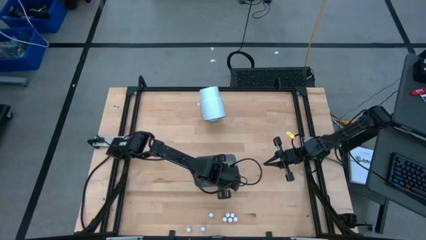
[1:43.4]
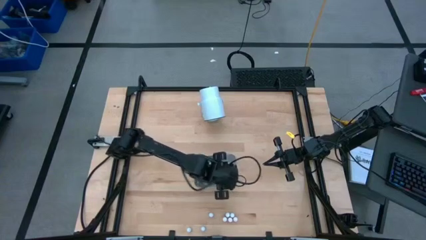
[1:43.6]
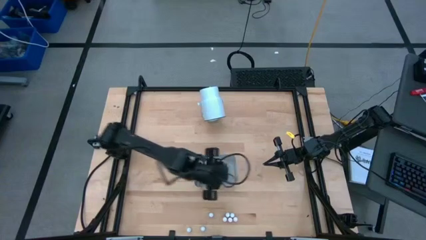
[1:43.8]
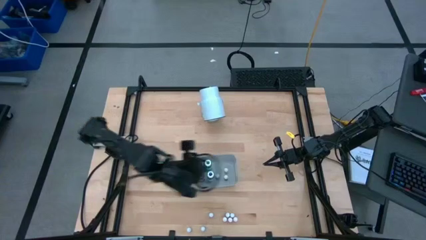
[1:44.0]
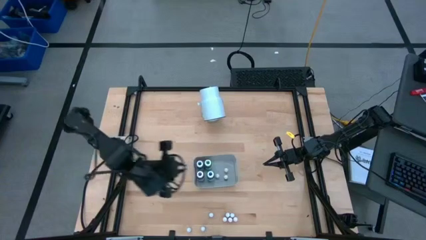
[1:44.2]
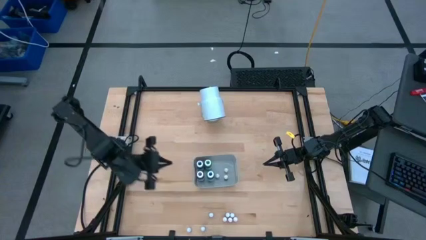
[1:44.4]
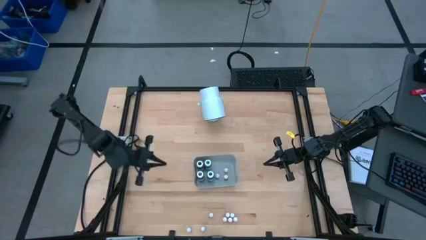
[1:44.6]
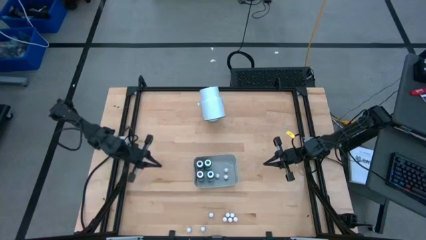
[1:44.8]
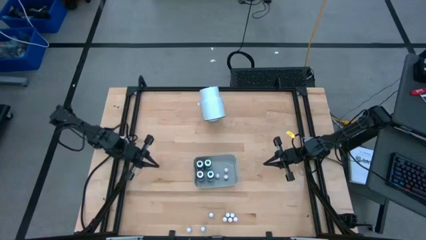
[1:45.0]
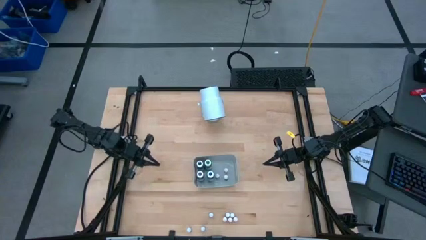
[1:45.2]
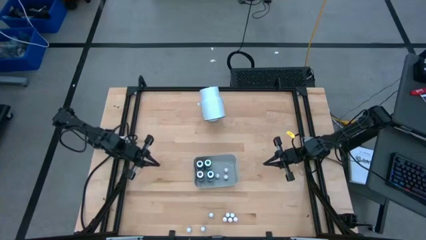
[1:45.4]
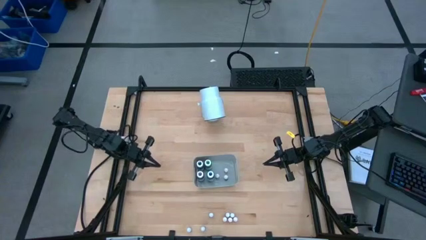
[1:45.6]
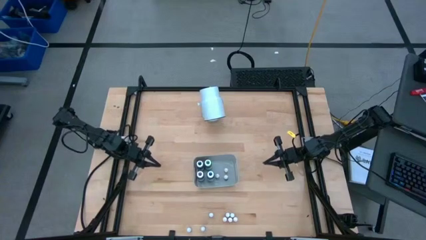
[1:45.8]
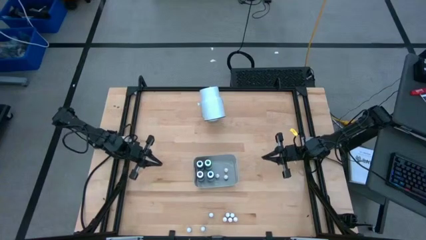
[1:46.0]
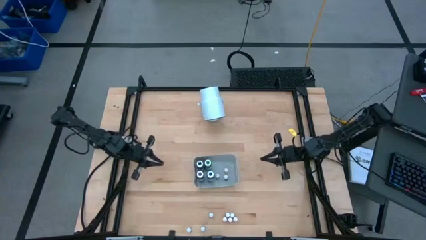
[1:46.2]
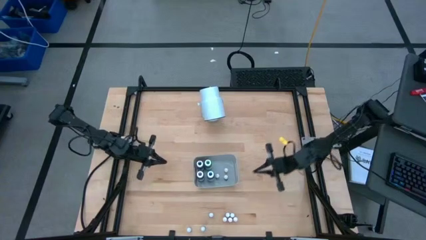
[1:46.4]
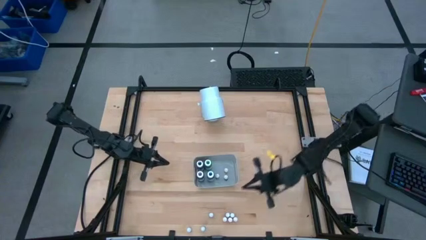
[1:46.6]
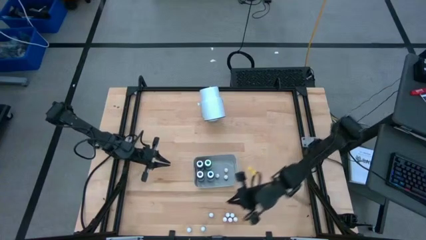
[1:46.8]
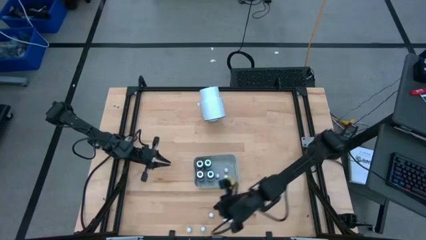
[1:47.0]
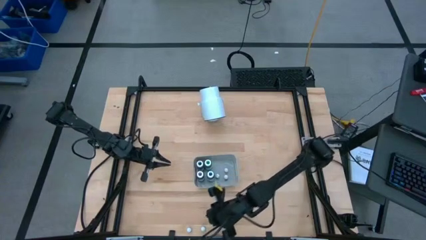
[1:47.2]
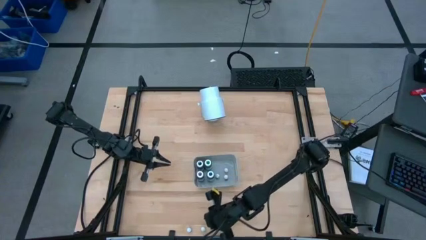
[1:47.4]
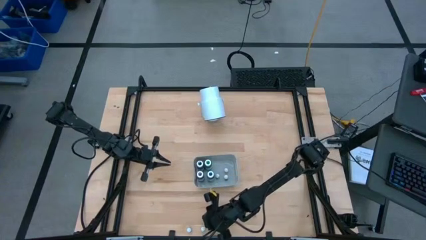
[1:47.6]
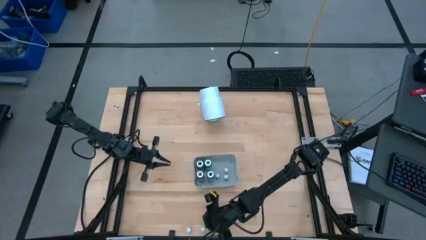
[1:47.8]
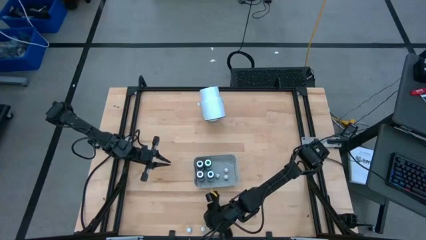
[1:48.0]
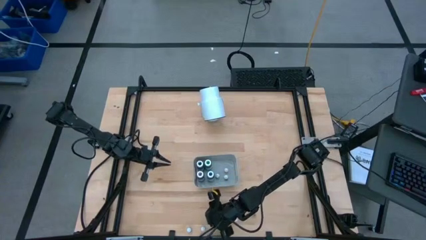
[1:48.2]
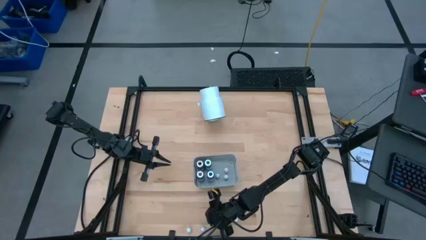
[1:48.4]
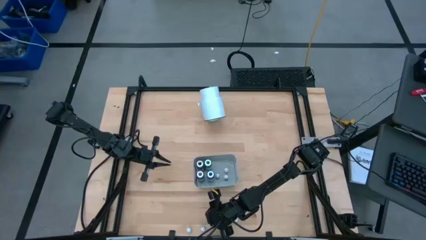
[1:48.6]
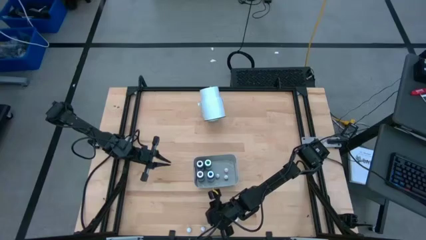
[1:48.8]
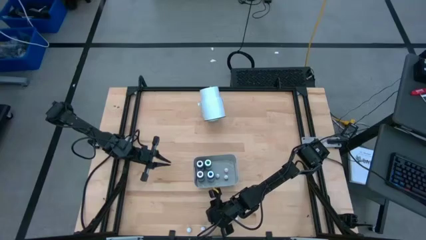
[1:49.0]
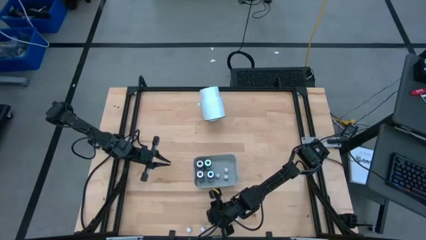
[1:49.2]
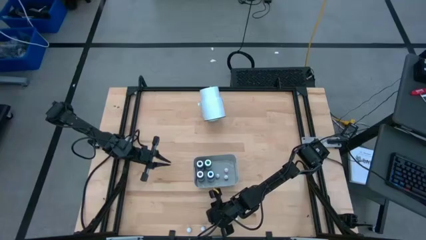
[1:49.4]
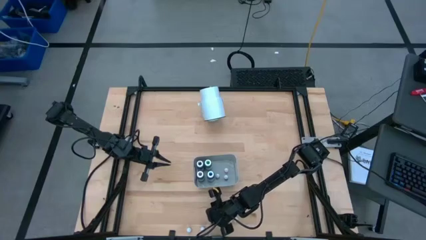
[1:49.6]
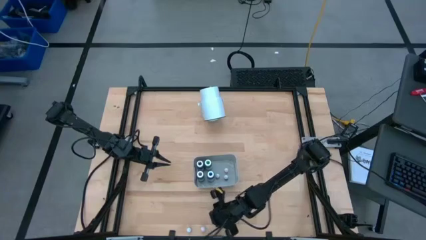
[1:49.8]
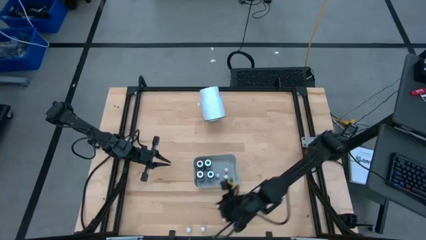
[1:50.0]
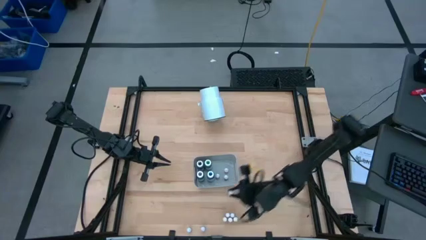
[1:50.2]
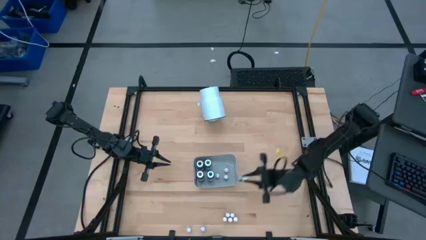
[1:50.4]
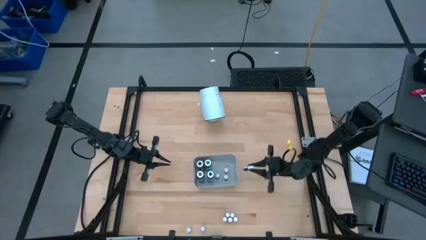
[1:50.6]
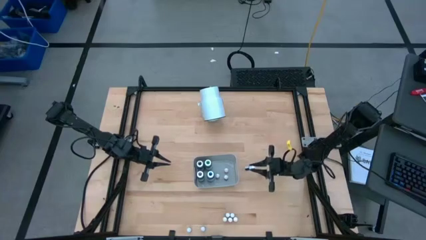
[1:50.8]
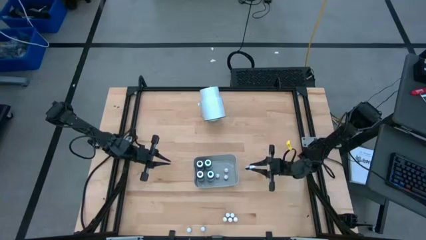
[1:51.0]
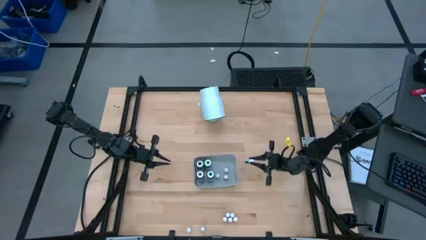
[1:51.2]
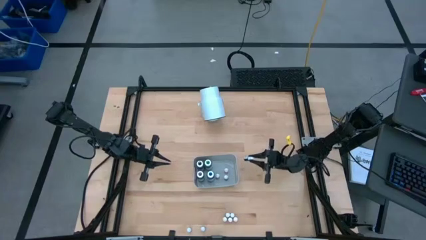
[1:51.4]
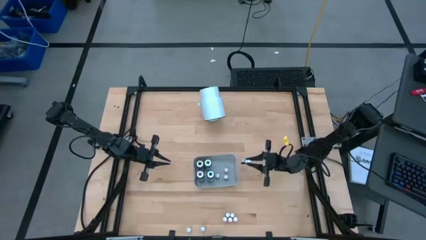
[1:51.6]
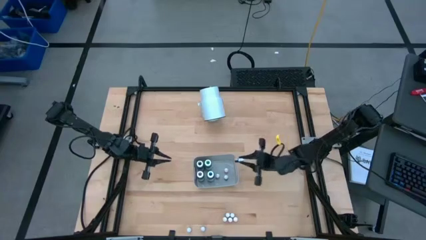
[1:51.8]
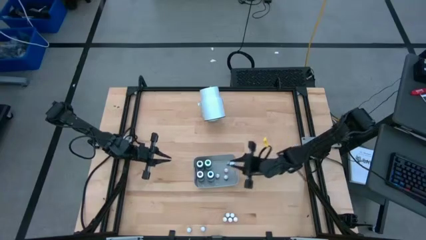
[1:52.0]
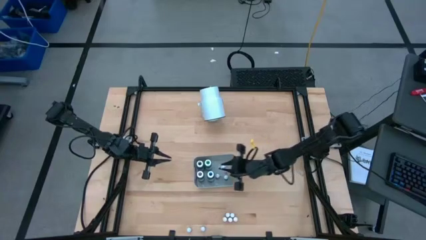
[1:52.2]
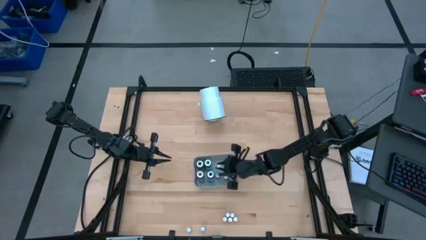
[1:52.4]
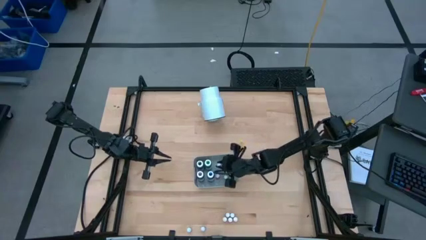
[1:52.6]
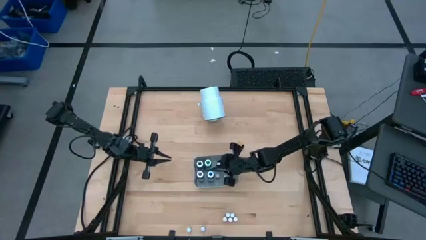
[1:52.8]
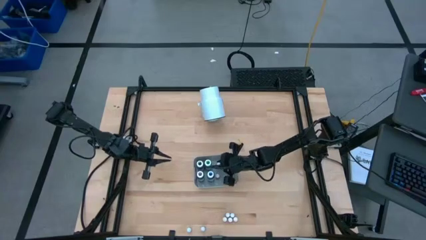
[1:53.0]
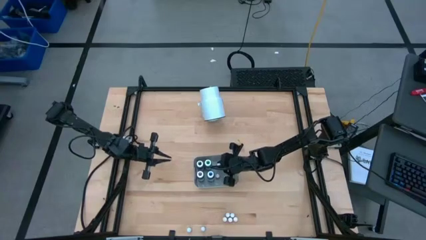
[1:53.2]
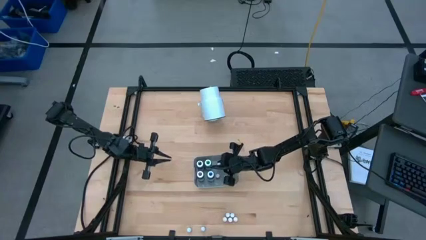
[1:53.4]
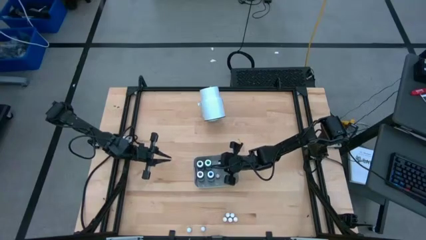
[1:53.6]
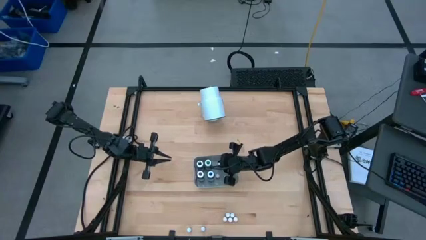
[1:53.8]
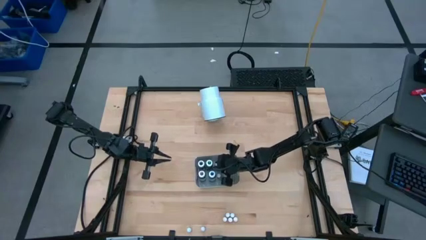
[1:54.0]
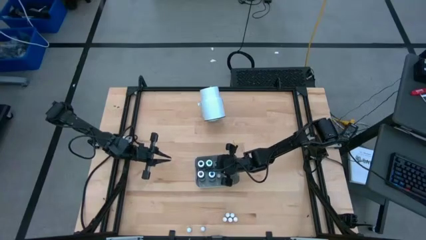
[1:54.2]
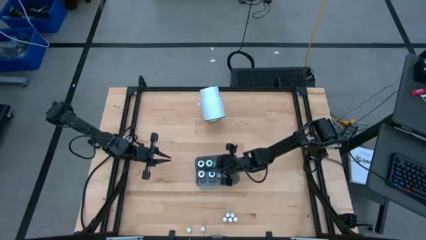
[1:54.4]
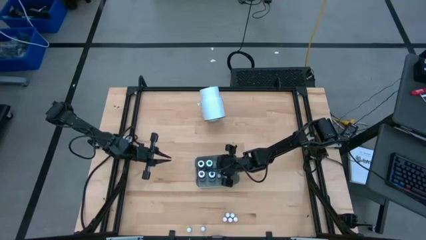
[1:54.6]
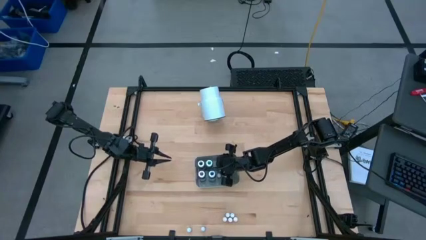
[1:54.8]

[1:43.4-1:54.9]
Task: Pick & Place food coloring
Put the small blue food coloring into the gray bin

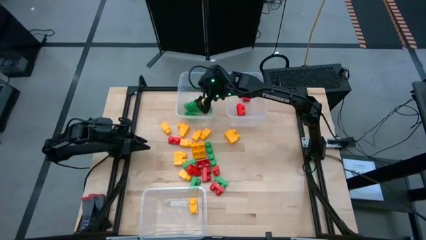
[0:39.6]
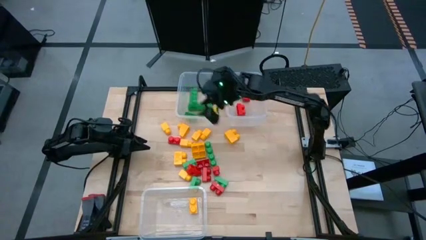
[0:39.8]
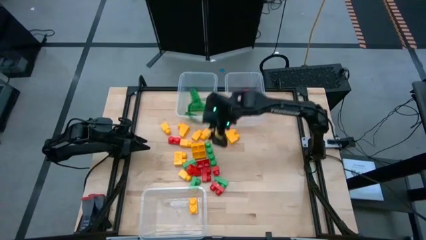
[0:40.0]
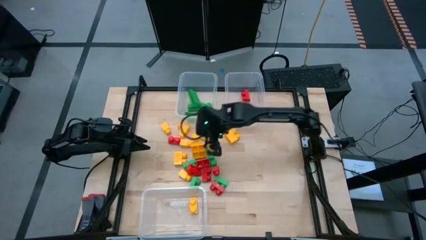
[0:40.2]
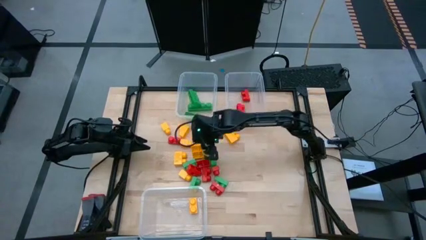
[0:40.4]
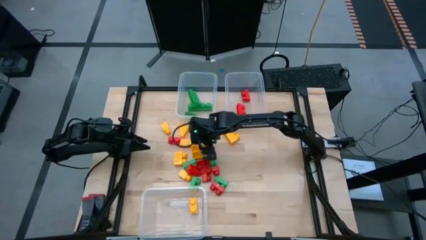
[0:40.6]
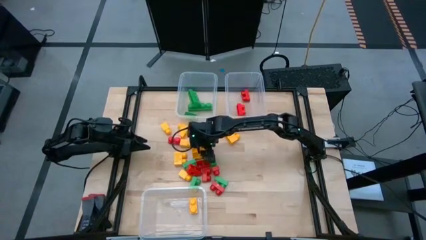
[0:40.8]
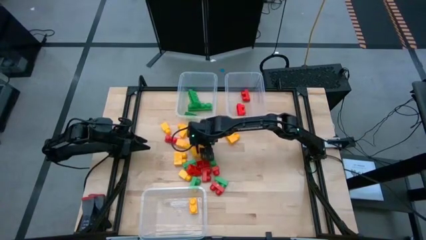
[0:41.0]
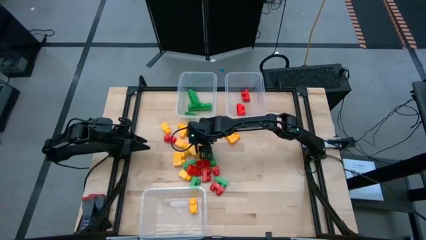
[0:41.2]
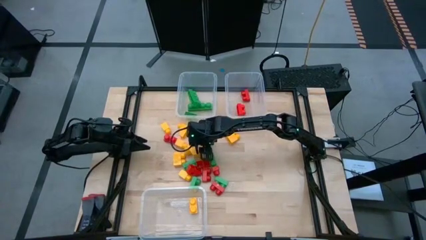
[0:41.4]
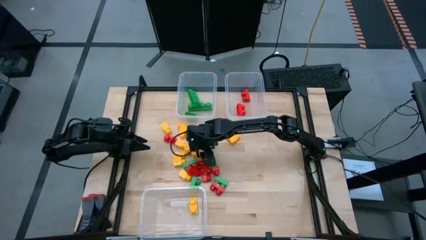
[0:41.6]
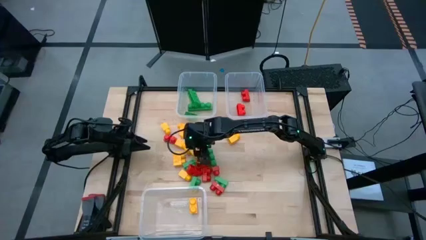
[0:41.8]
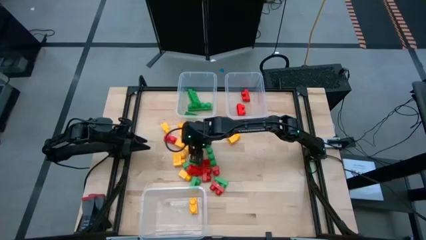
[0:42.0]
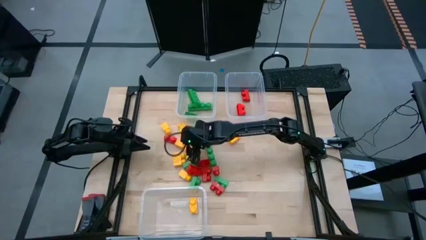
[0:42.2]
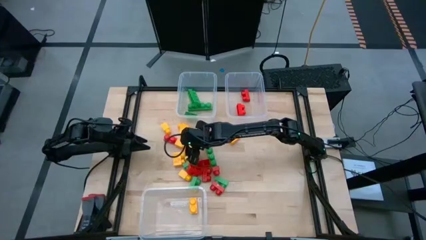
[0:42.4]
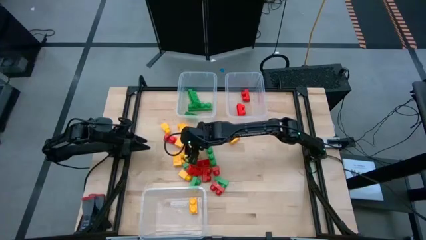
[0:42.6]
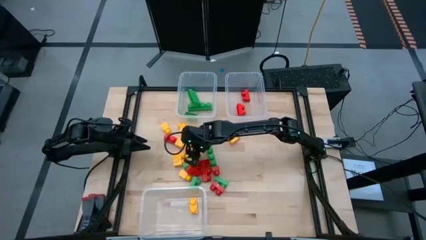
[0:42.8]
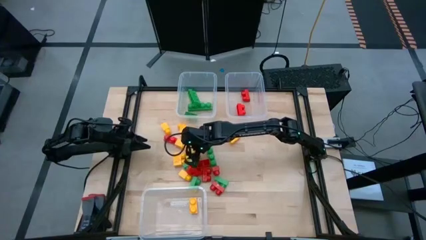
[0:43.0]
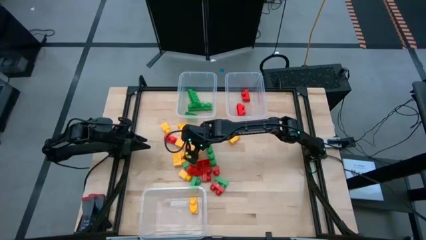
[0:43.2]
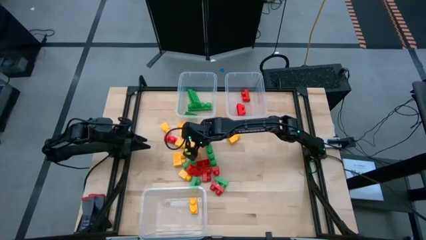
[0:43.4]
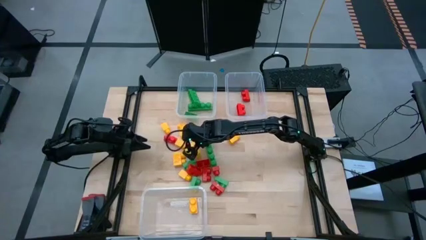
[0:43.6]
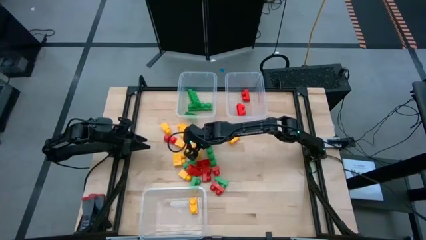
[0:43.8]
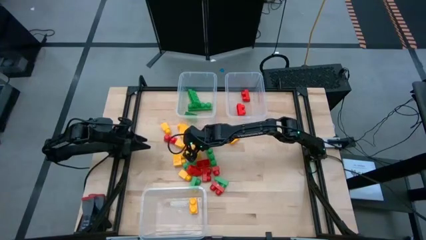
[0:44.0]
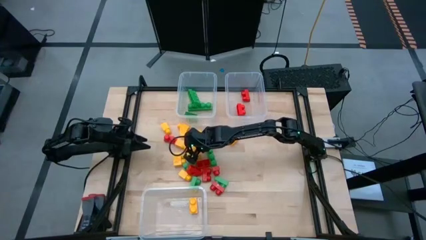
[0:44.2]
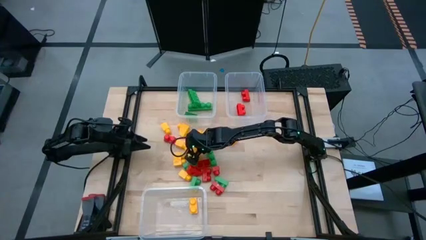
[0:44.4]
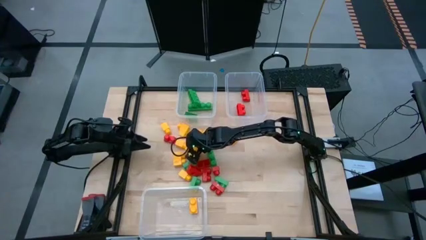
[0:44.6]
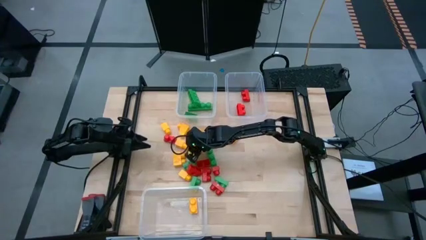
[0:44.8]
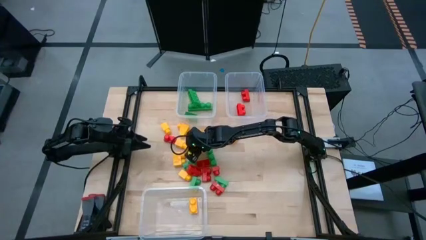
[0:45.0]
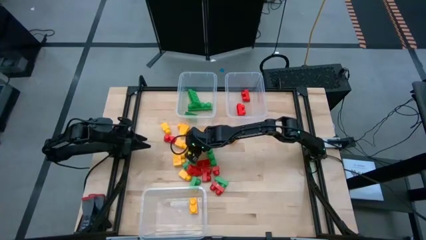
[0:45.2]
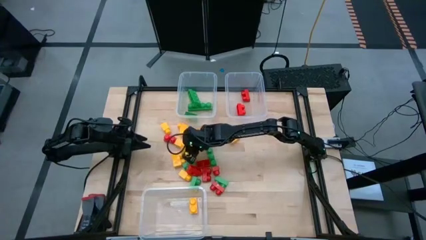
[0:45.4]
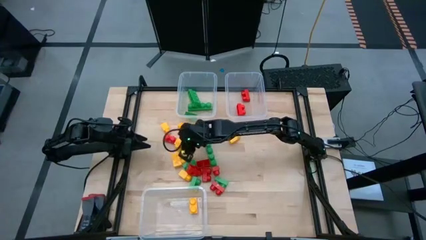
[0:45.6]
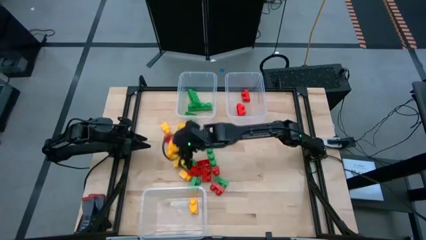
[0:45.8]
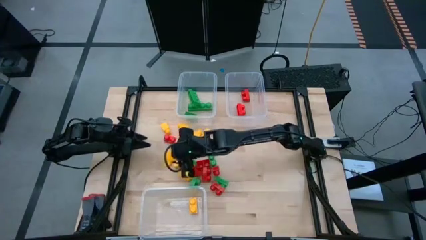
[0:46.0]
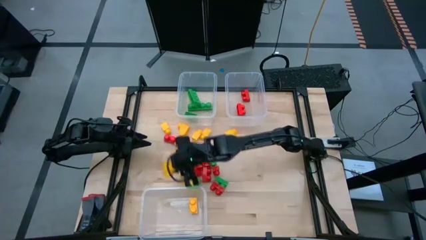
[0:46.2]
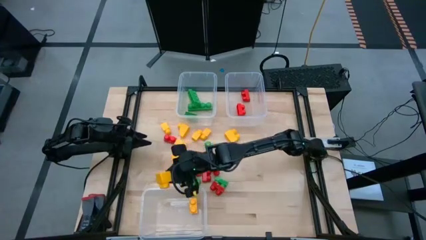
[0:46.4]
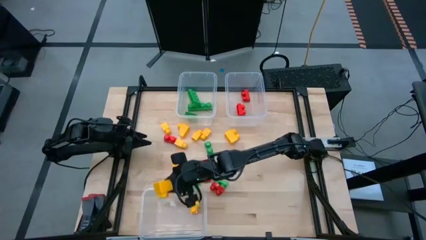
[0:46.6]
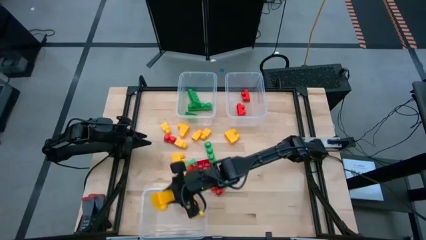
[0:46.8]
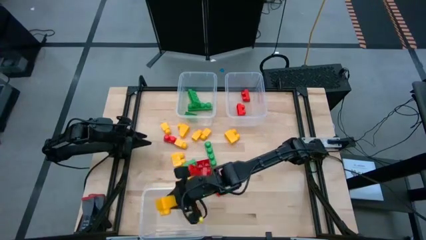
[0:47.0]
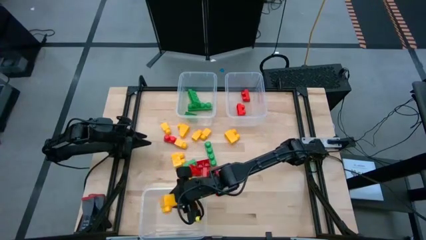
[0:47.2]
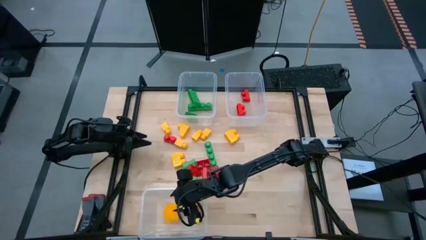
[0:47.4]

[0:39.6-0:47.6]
Task: Sort blocks
Put the yellow game piece into the bottom transparent bin
